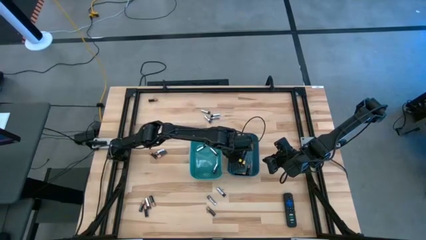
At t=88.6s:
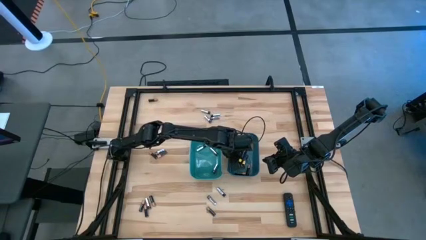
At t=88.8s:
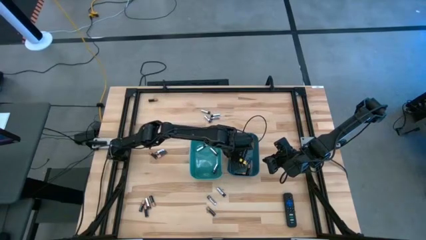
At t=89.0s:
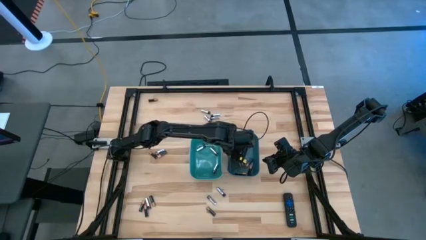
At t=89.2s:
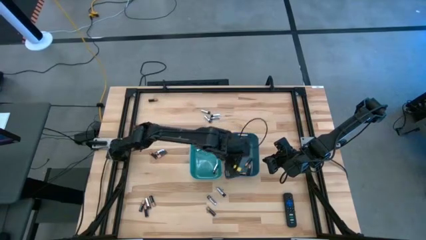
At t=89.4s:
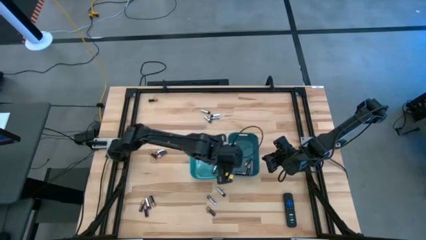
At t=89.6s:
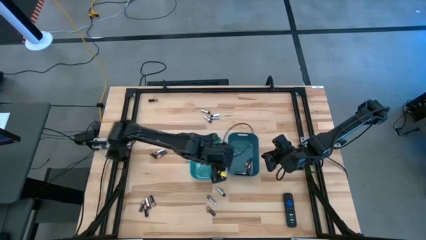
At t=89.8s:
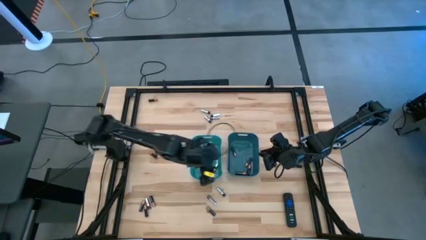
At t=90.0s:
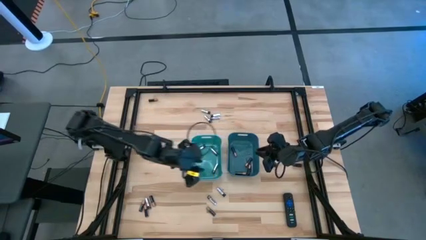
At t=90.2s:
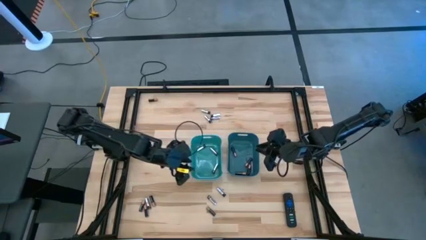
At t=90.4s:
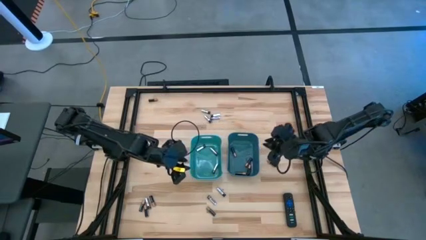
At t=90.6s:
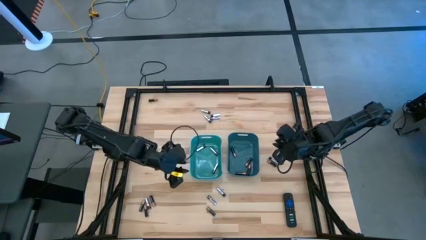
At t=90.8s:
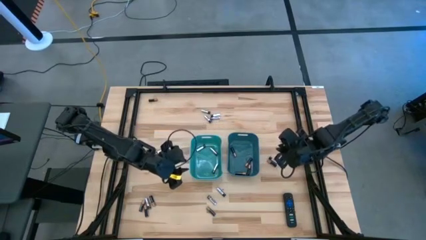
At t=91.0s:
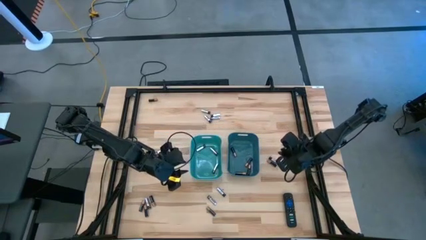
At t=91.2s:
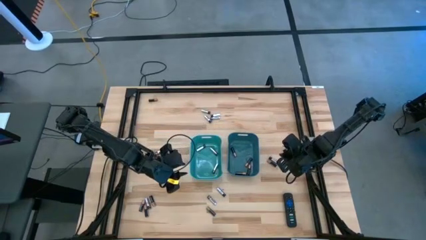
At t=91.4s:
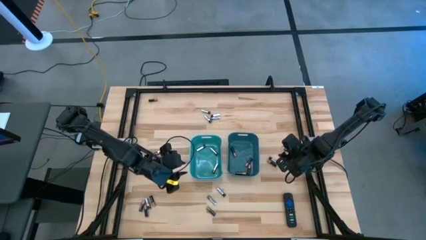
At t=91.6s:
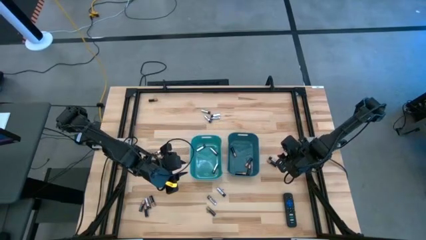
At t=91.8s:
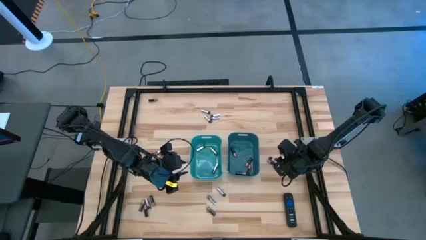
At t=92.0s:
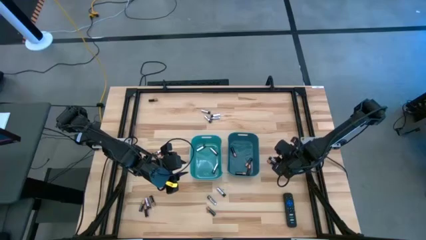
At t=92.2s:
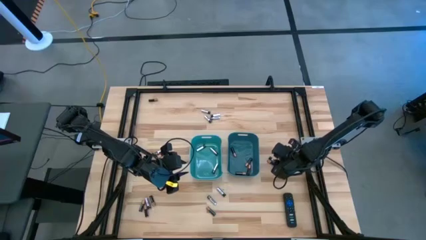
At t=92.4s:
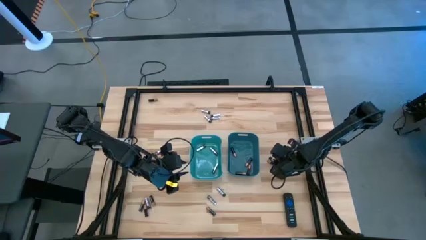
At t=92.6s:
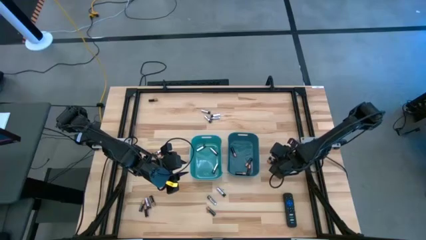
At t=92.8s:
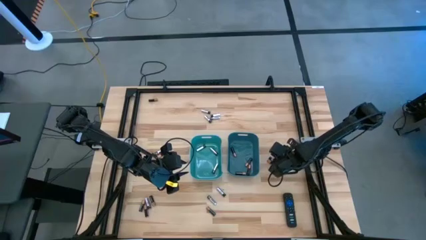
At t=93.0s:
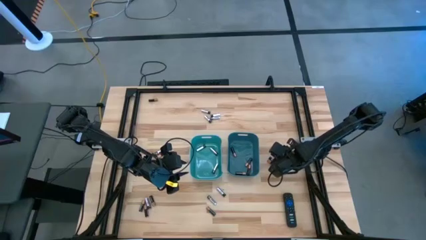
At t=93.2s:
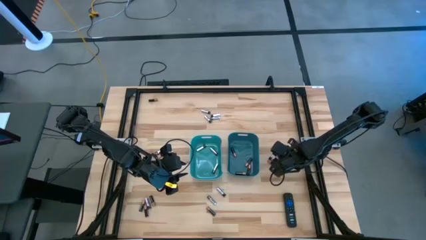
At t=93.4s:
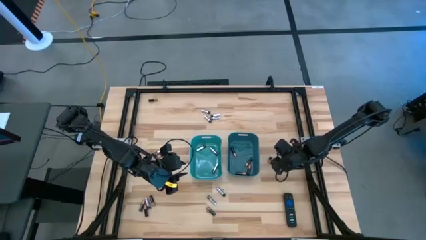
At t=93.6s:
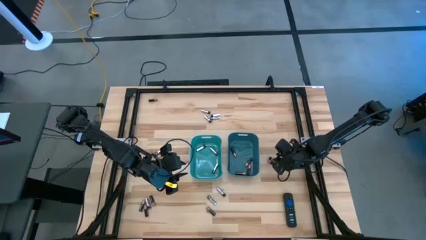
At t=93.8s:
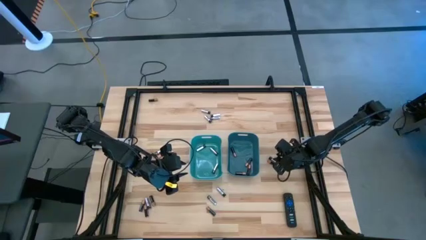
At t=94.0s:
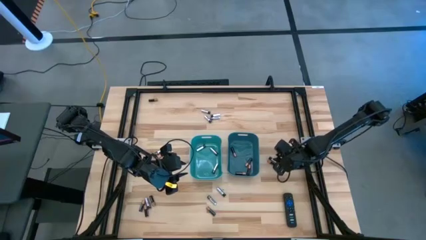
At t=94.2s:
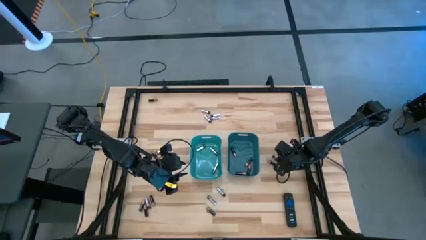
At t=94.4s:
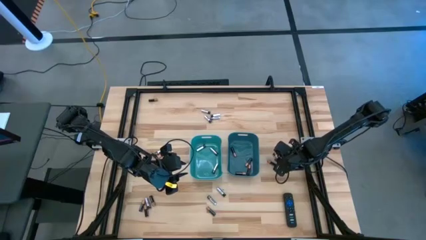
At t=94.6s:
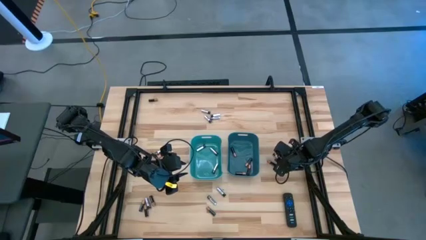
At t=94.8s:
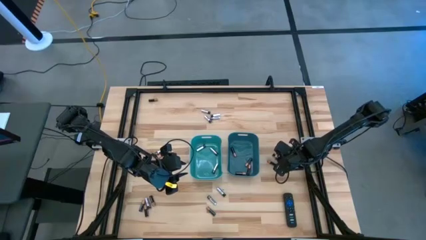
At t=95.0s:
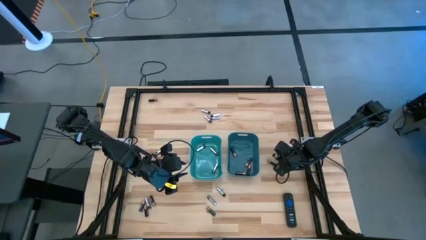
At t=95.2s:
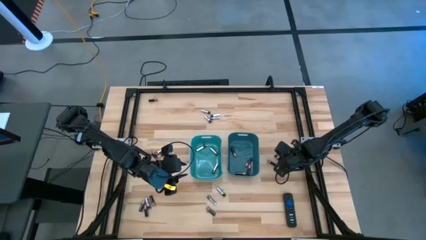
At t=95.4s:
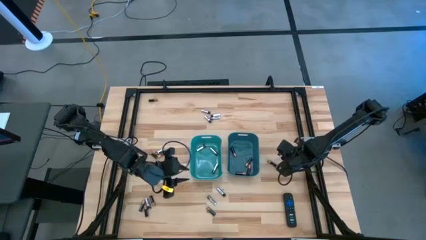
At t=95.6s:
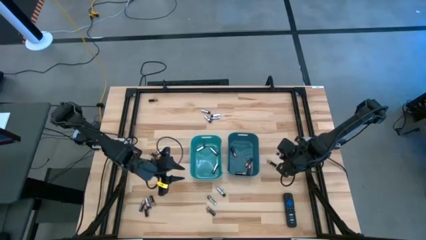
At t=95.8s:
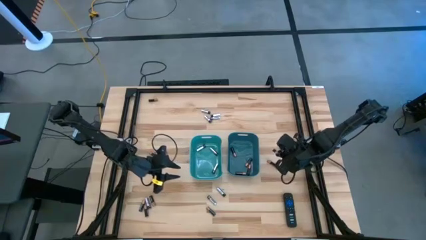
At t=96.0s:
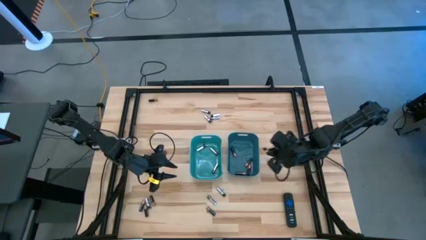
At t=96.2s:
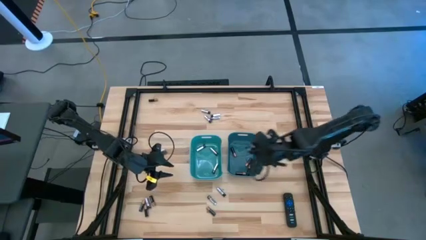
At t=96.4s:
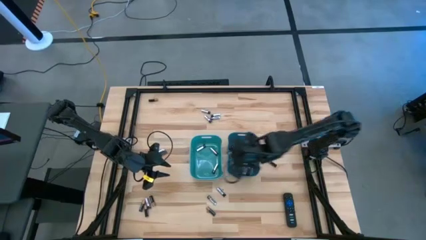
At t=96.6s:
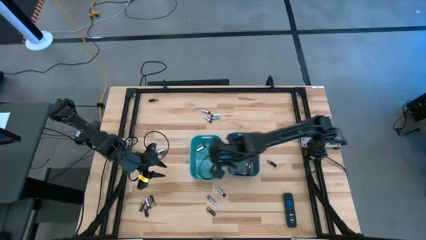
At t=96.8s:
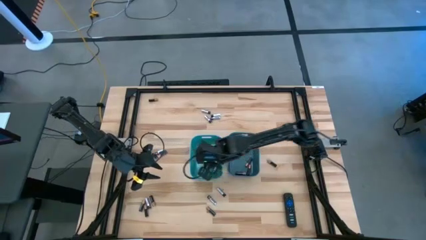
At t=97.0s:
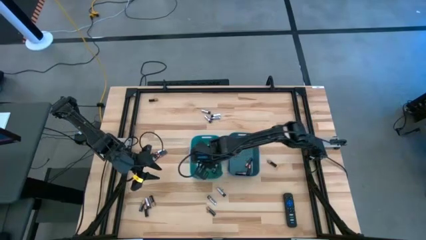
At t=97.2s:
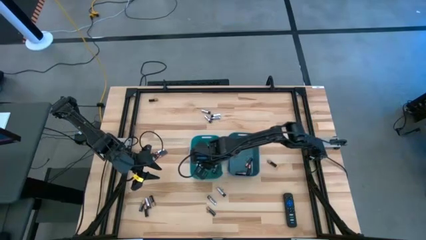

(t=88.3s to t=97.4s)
Task: Sort batteries
Put the silver battery into the green bin

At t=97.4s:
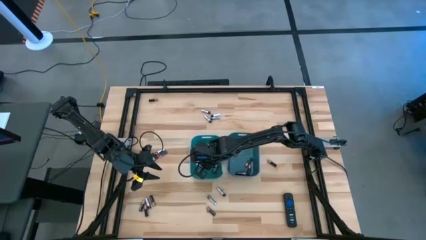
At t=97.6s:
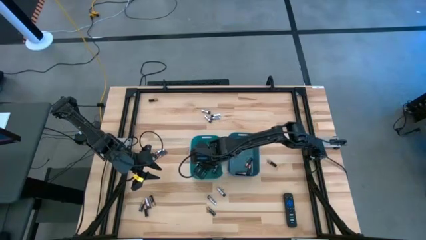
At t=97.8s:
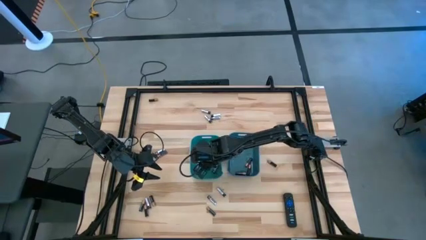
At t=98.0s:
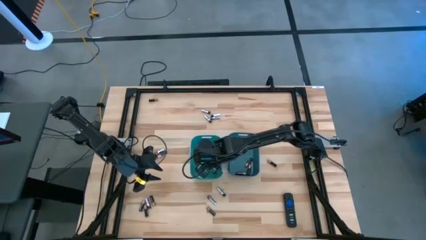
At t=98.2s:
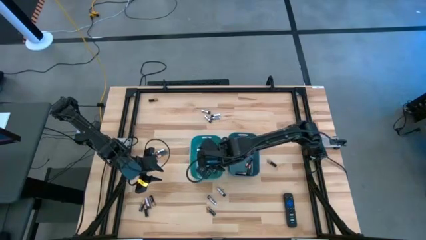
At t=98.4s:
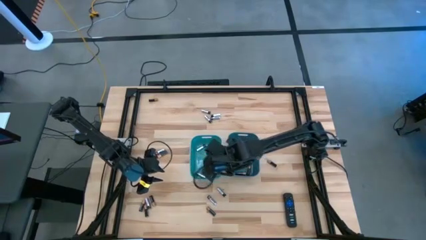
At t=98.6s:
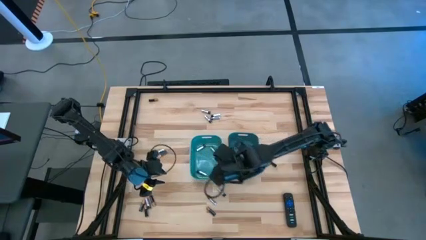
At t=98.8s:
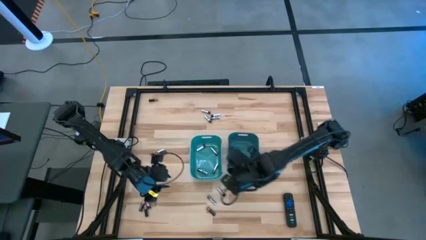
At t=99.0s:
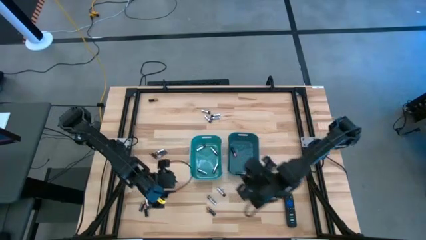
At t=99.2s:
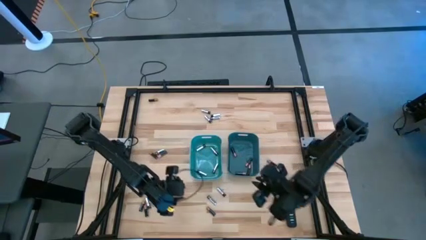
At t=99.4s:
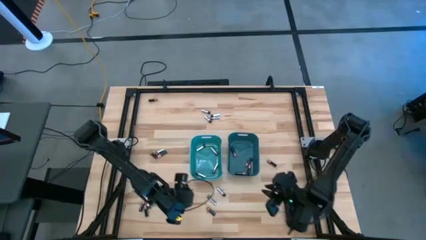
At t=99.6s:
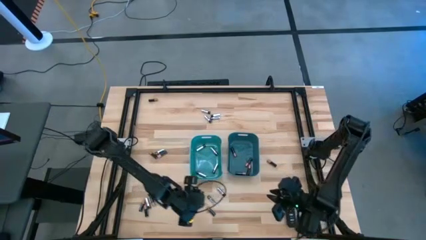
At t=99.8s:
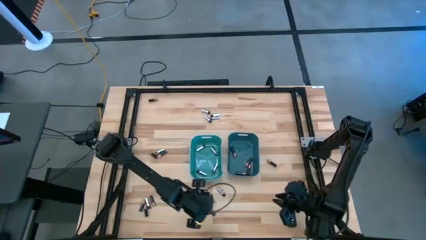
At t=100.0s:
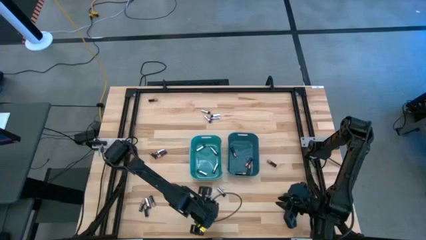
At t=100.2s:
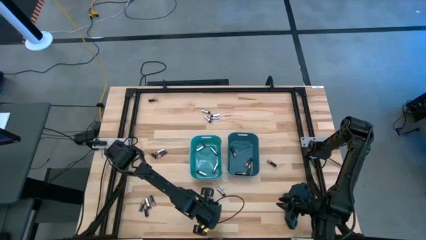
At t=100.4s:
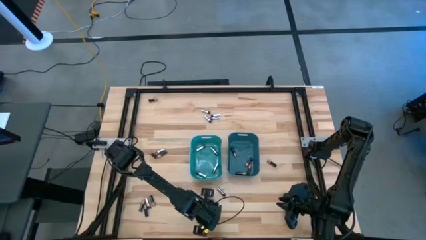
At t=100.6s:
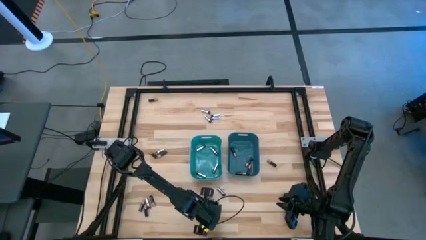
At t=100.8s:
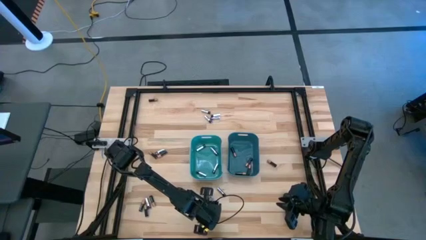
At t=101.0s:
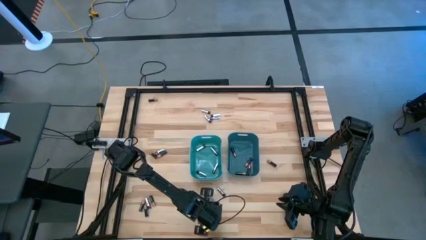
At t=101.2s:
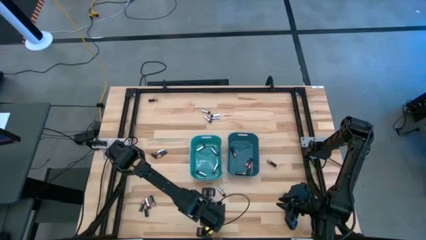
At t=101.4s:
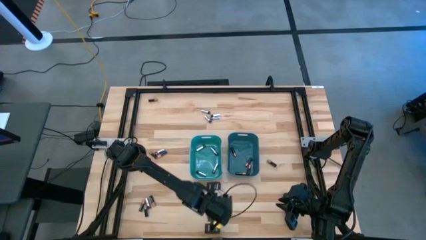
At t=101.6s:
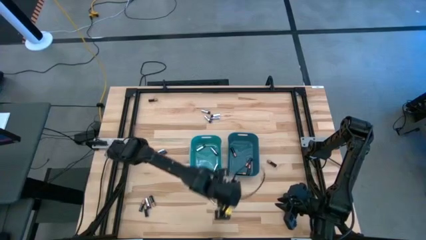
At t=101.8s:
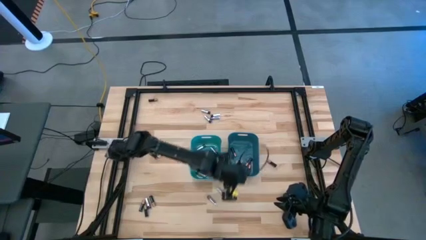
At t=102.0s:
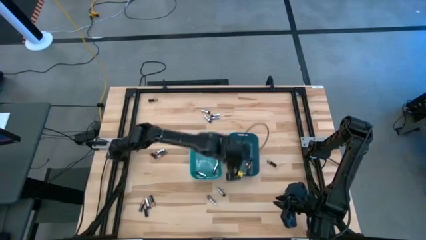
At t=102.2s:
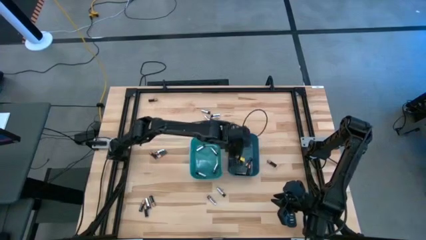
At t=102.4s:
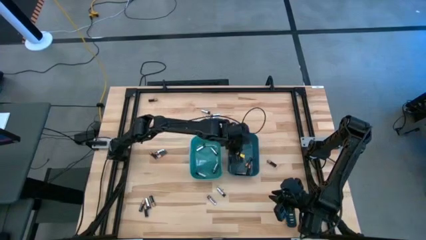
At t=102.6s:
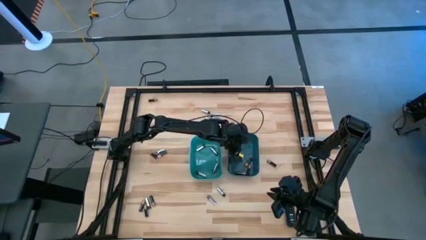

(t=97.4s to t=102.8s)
Put the black battery into the blue bin
